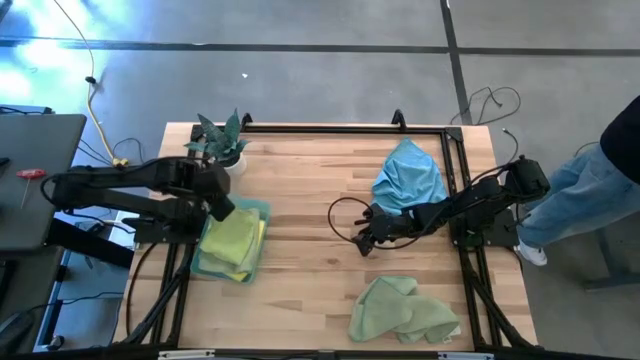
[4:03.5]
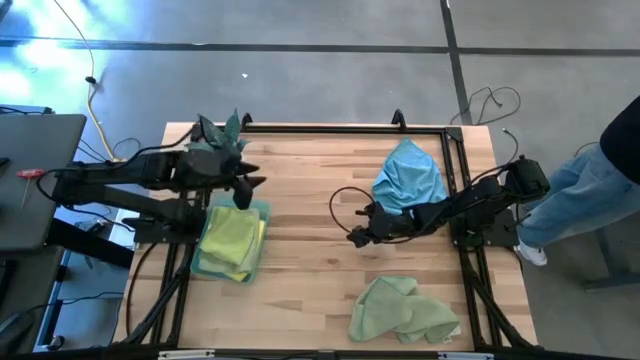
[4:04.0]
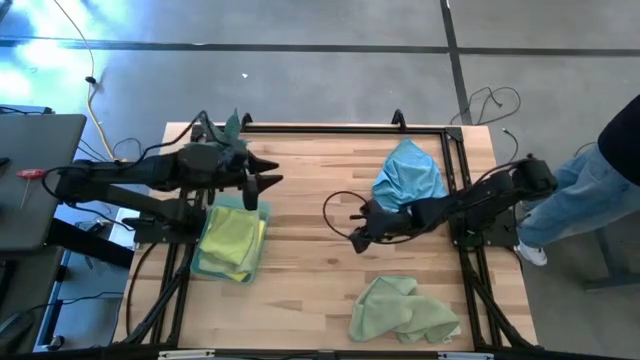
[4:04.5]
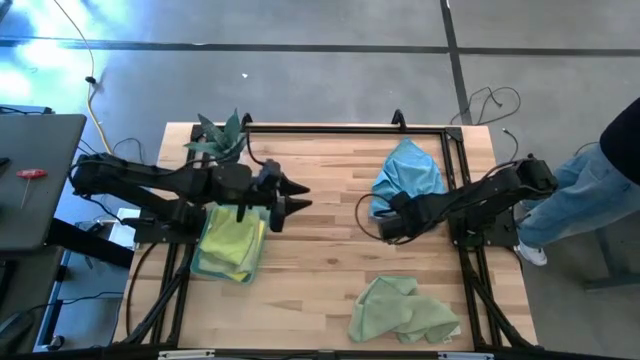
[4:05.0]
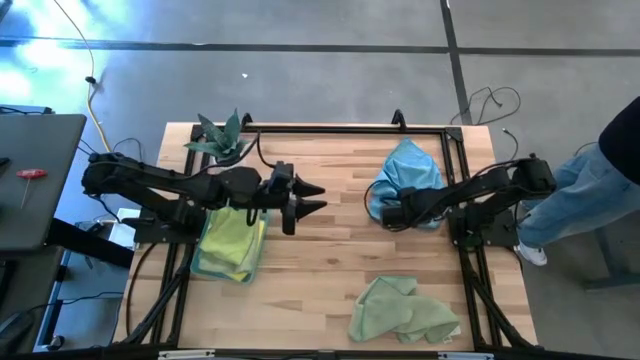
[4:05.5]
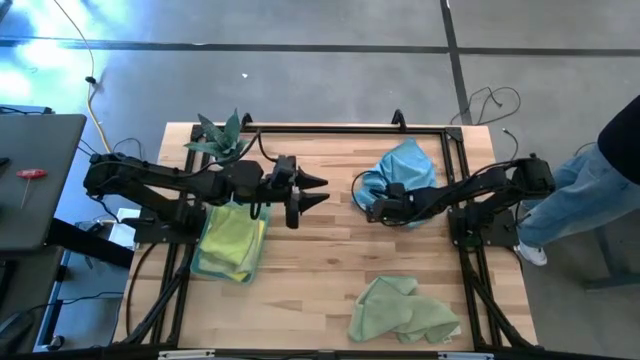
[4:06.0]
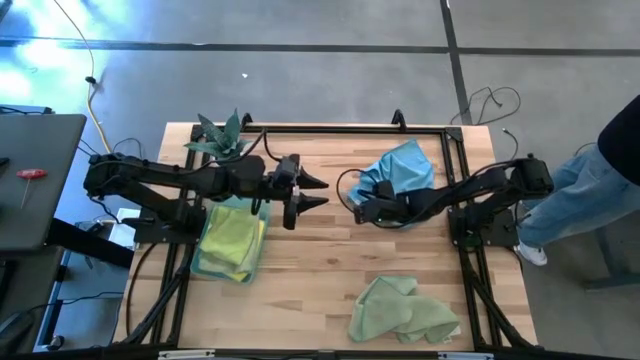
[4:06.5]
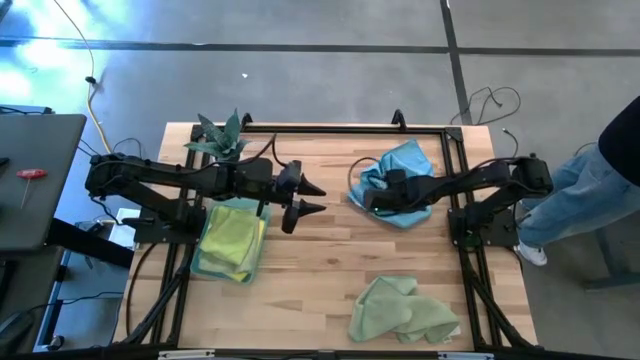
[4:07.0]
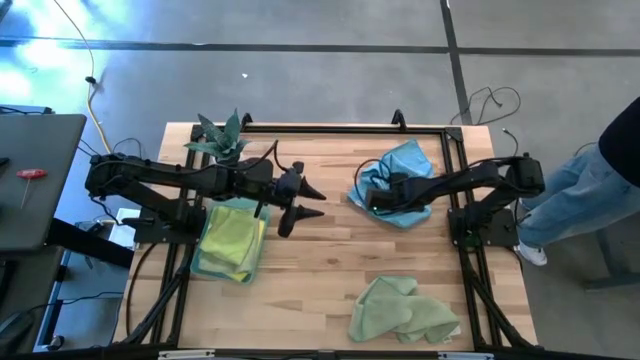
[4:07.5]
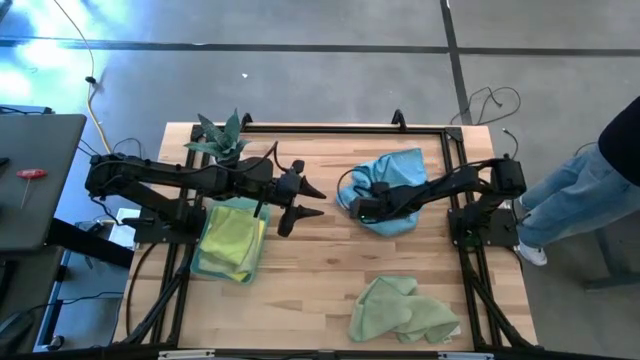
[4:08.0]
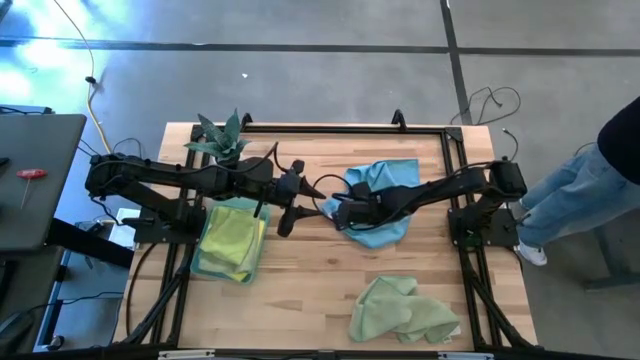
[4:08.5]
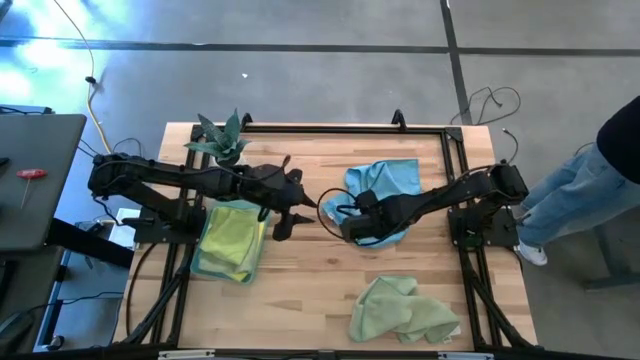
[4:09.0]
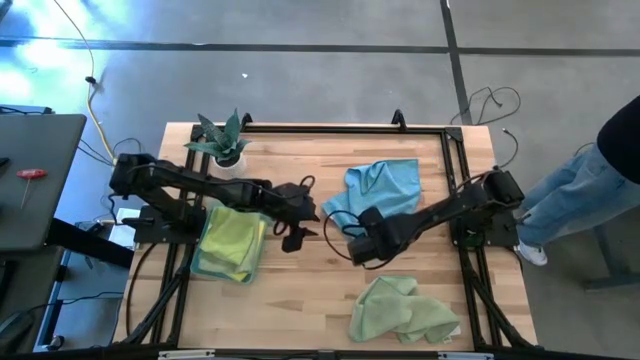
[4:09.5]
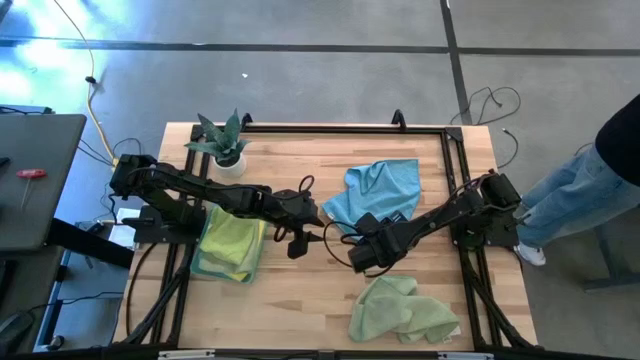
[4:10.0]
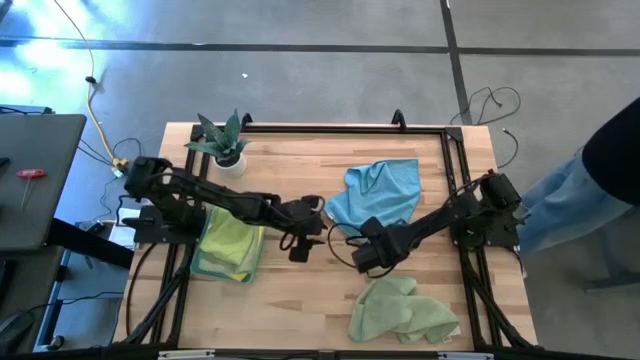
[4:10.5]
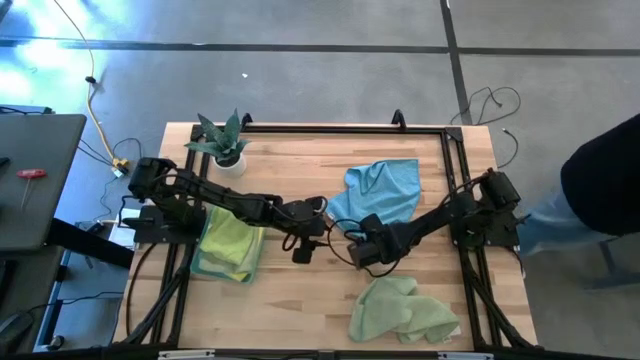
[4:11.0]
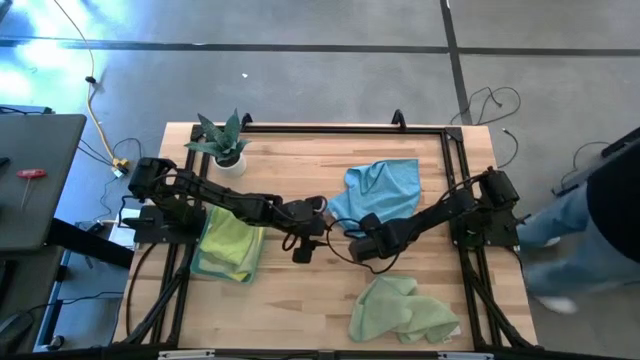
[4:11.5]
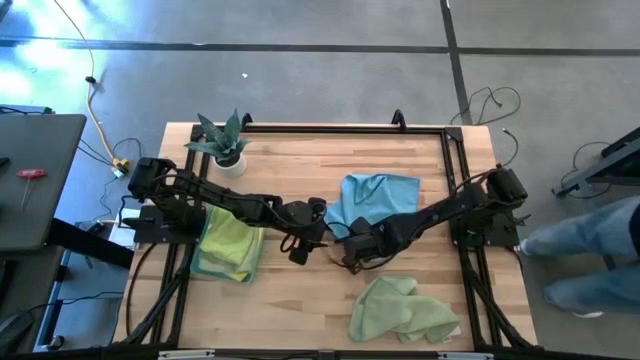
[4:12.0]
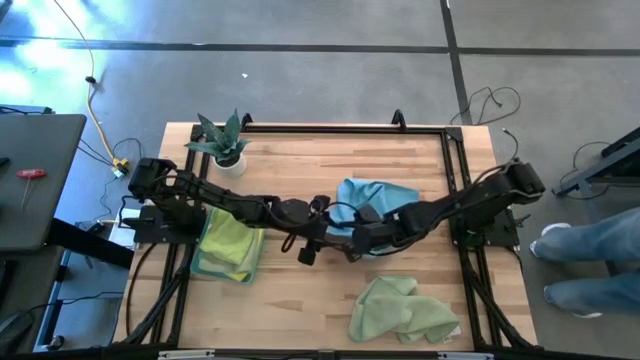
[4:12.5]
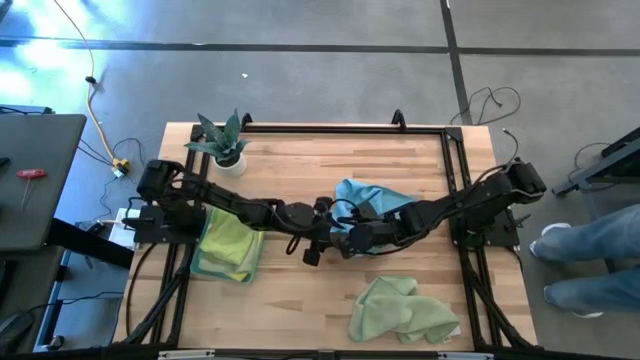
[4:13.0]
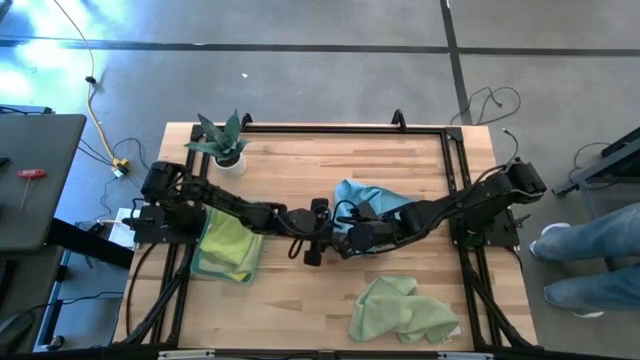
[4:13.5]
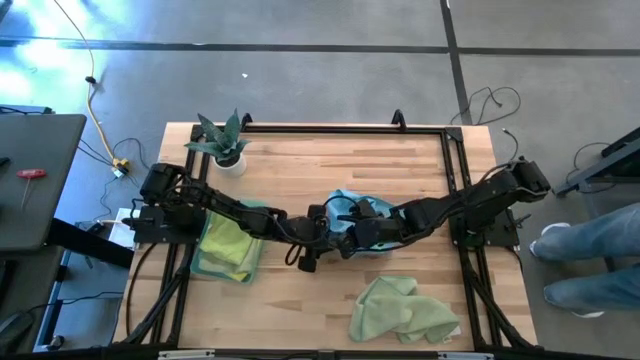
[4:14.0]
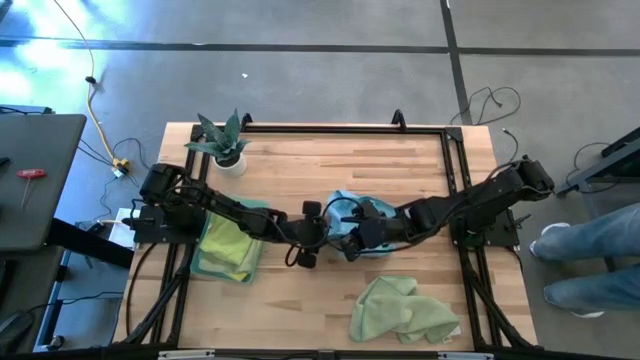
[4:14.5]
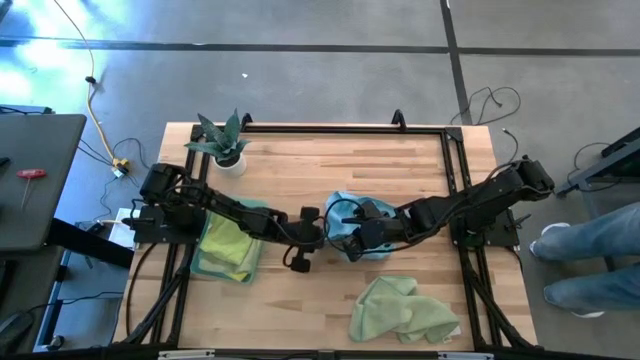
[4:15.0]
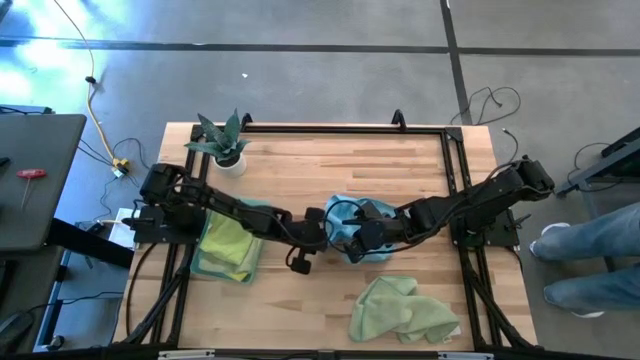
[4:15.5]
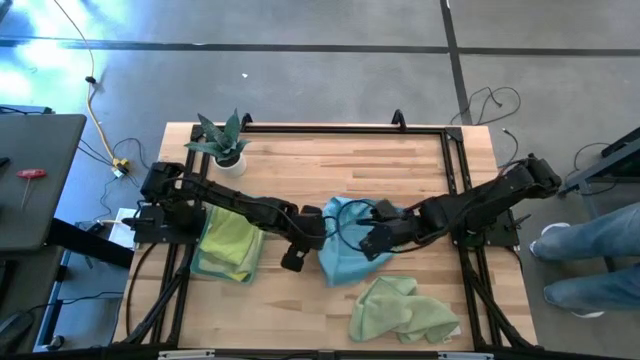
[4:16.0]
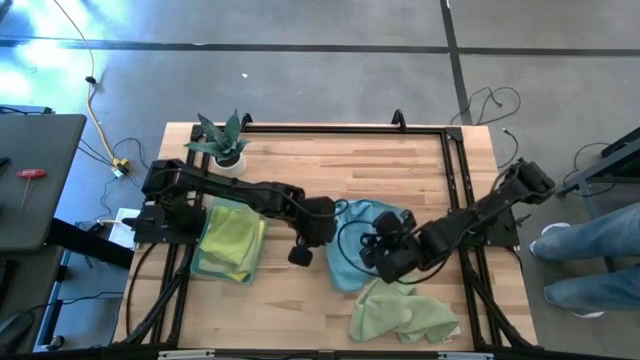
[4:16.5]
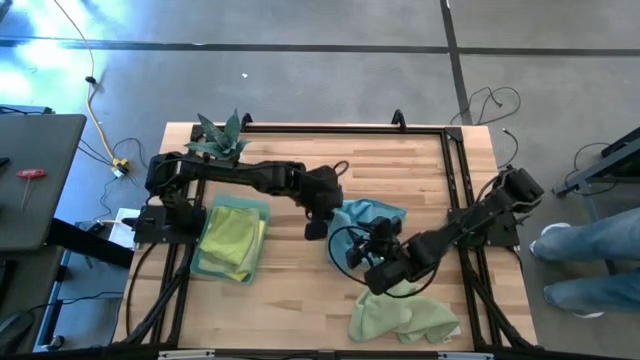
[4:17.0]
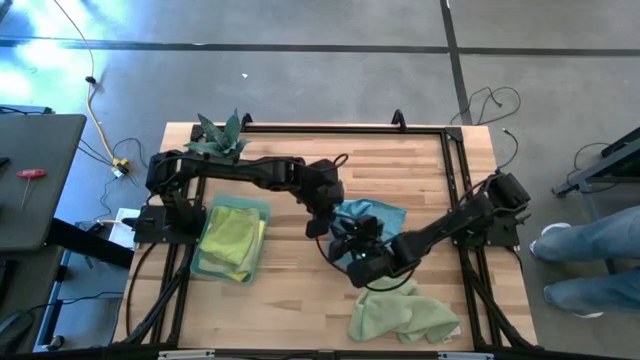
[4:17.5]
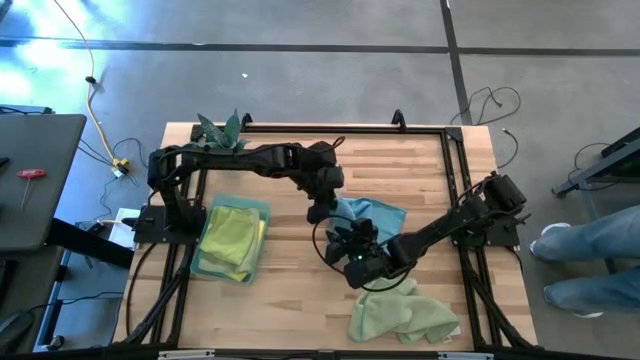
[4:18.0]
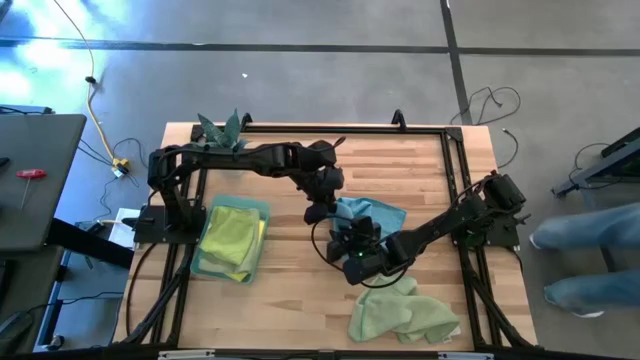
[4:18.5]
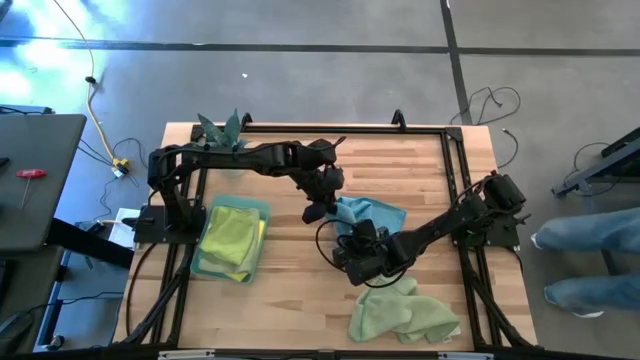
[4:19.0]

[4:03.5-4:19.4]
Task: Fold microfiber towels
Fold the blue microfiber towel

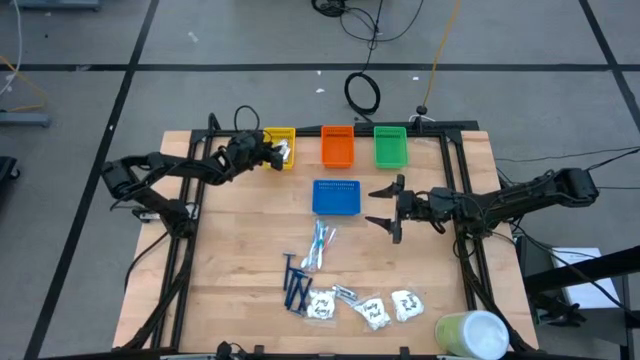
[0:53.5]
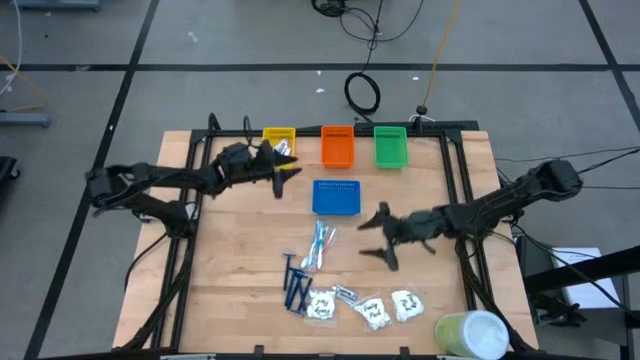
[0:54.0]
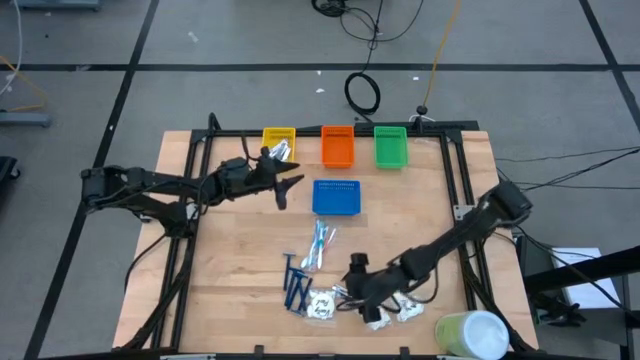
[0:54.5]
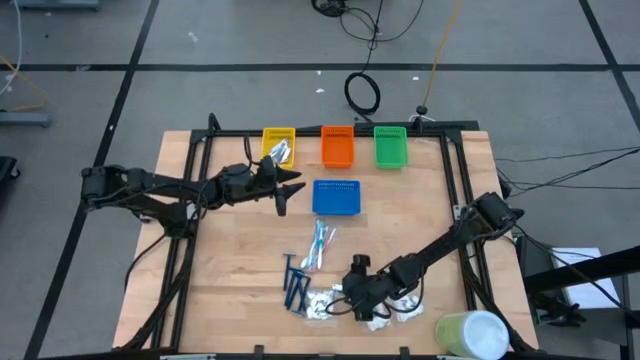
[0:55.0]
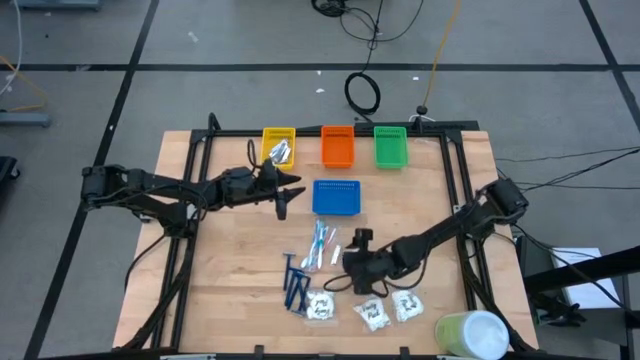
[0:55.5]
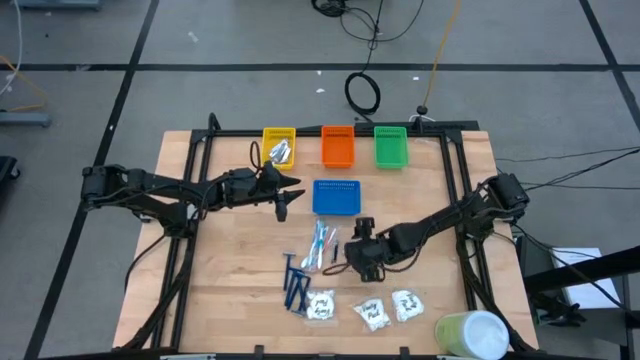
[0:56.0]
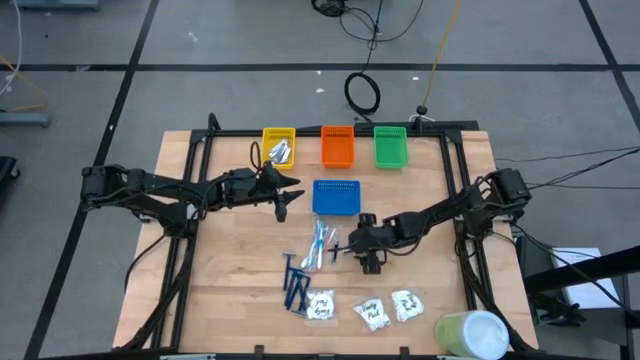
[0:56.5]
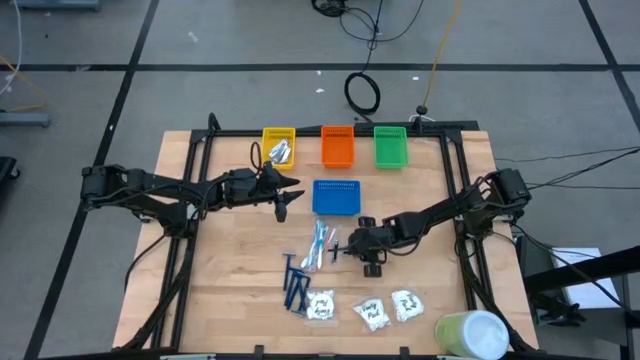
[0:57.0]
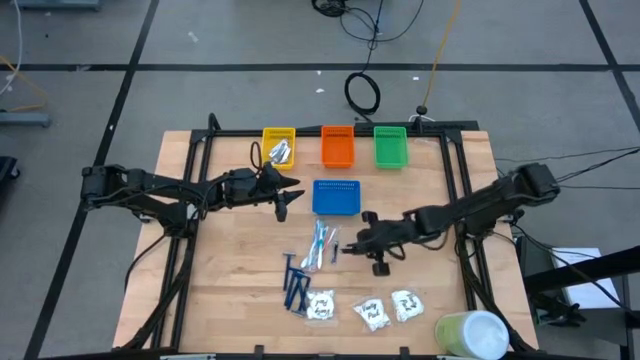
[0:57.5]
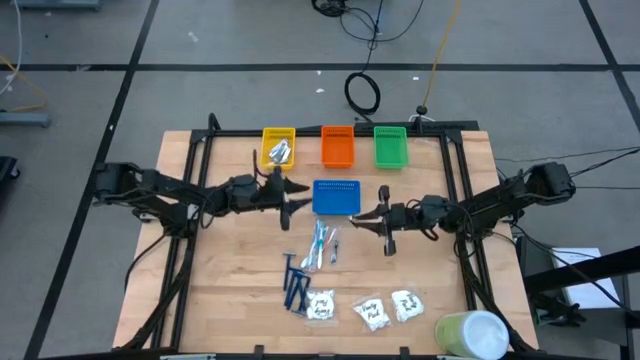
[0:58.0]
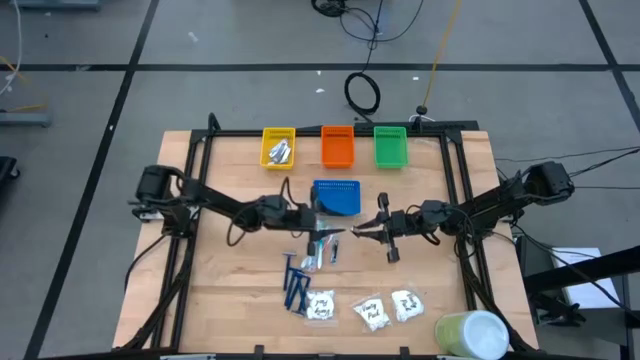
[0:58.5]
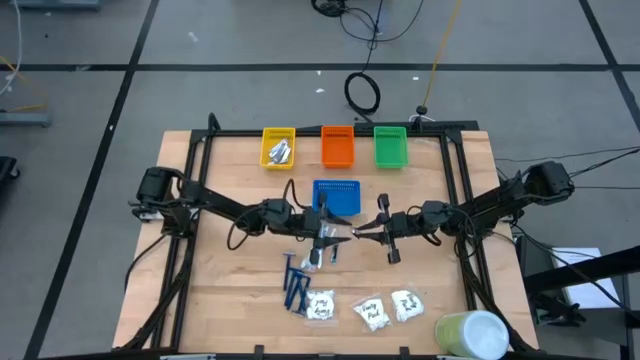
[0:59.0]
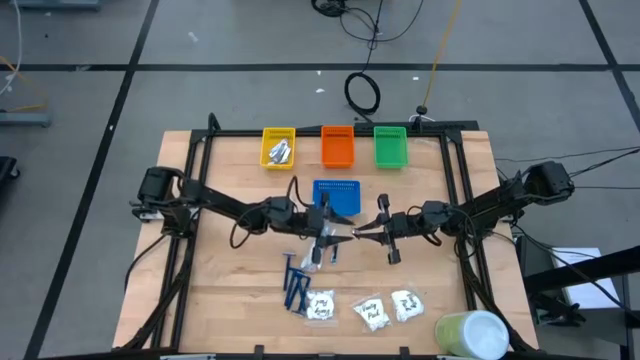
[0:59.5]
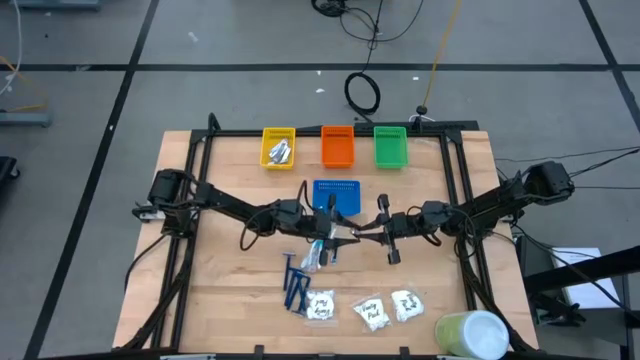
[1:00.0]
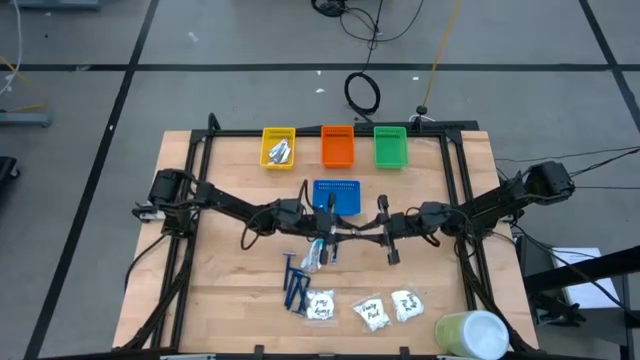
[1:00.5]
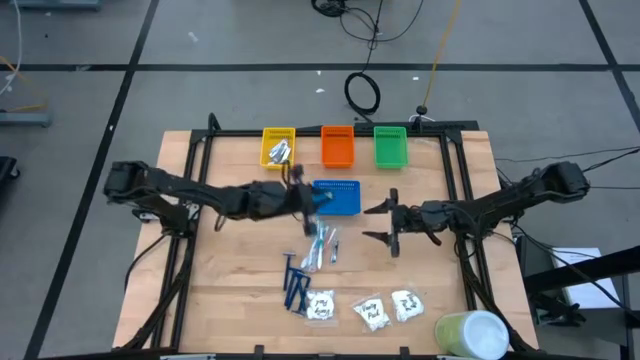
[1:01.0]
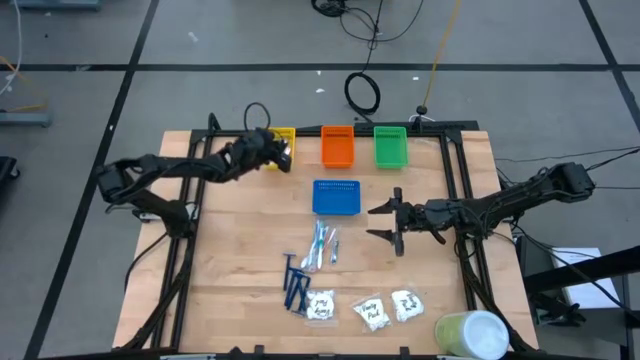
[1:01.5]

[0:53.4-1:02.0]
Task: Pick & Place Travel size toiletries
Put the silver nail cutter into the yellow basket
